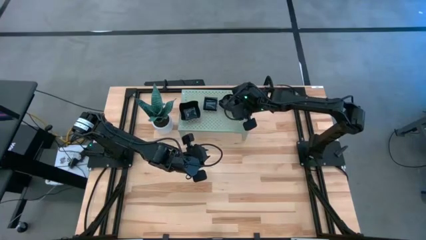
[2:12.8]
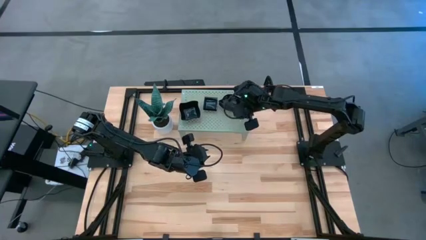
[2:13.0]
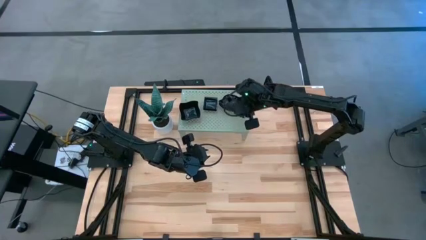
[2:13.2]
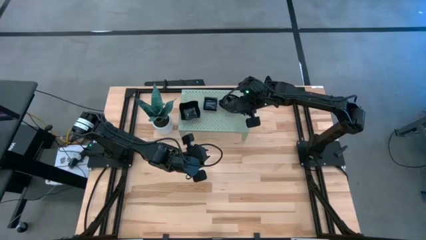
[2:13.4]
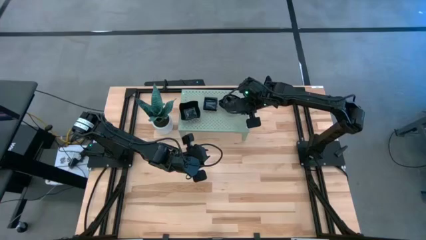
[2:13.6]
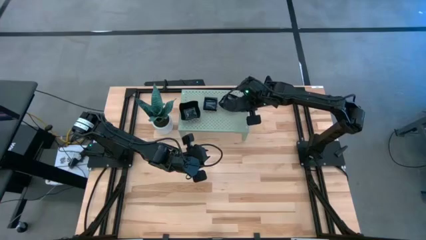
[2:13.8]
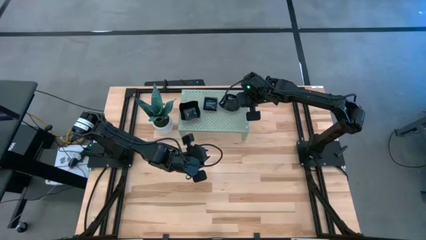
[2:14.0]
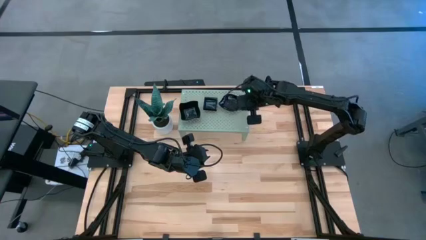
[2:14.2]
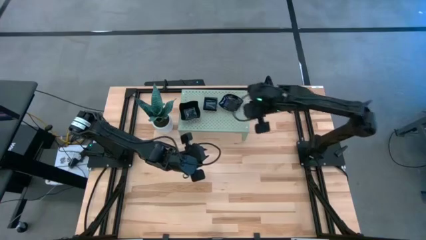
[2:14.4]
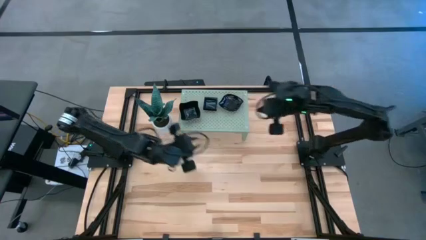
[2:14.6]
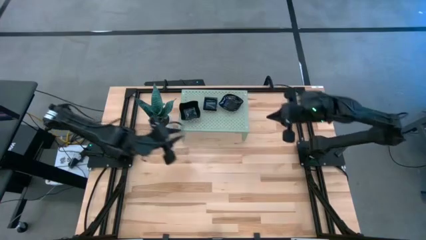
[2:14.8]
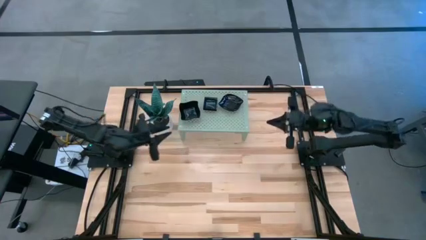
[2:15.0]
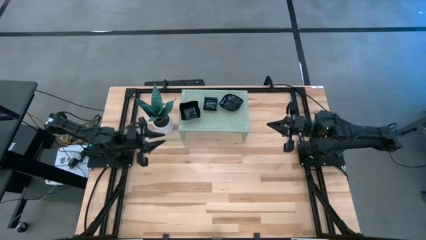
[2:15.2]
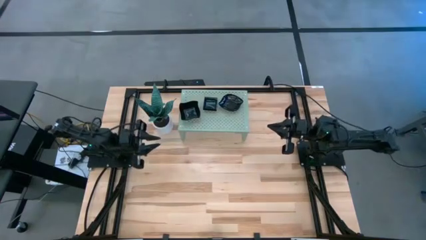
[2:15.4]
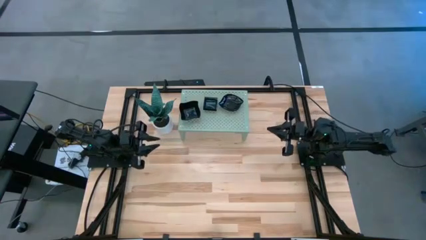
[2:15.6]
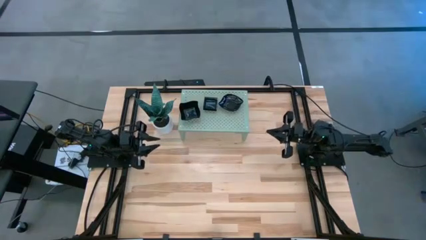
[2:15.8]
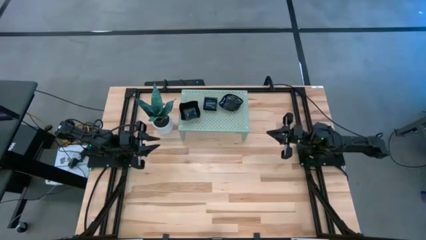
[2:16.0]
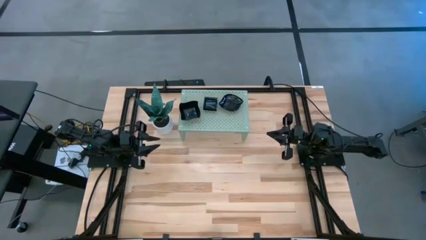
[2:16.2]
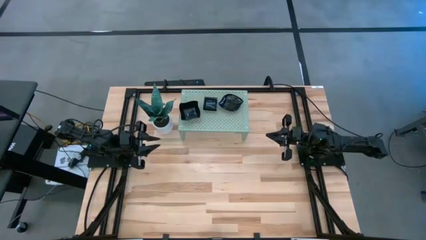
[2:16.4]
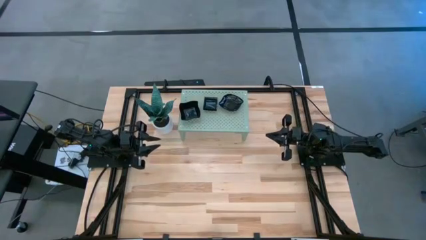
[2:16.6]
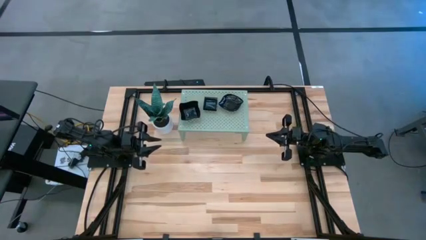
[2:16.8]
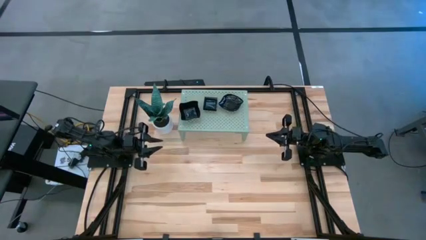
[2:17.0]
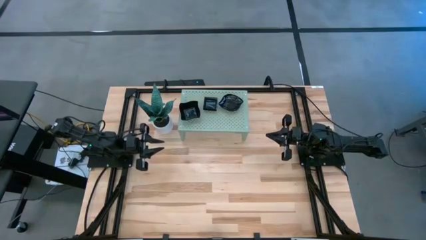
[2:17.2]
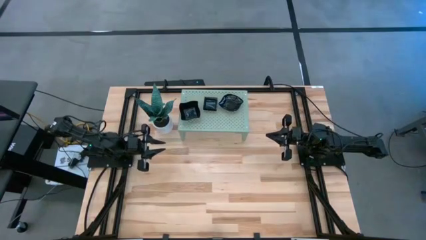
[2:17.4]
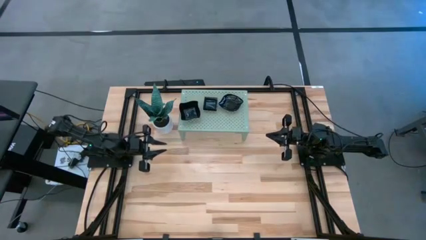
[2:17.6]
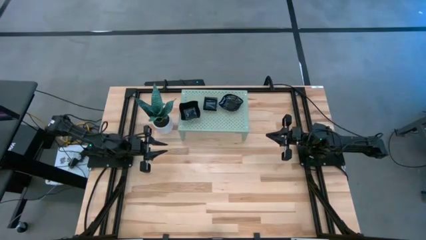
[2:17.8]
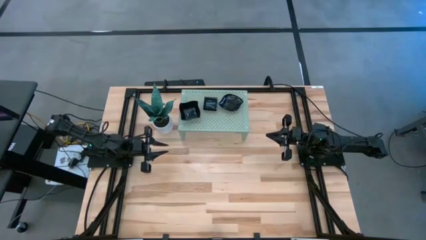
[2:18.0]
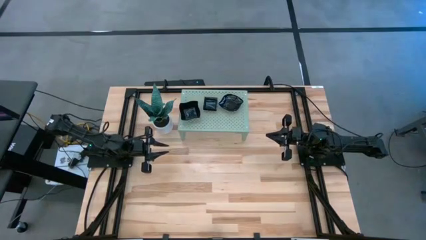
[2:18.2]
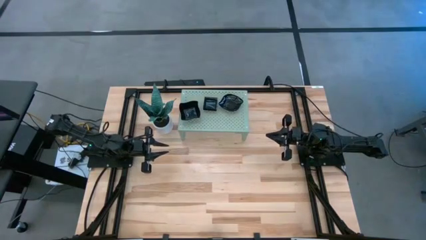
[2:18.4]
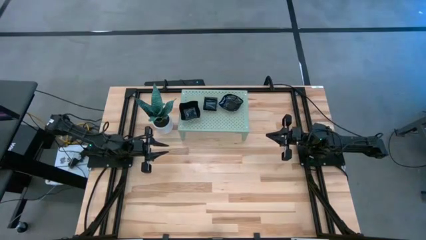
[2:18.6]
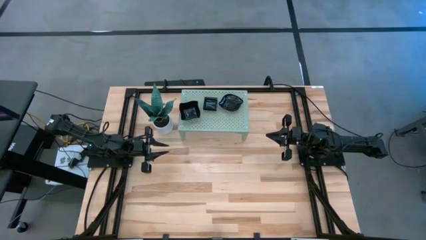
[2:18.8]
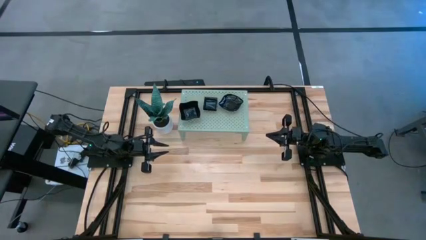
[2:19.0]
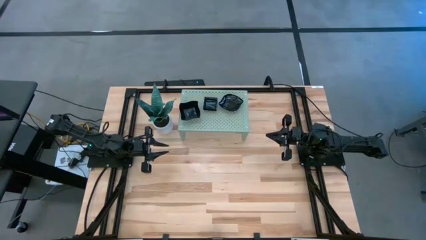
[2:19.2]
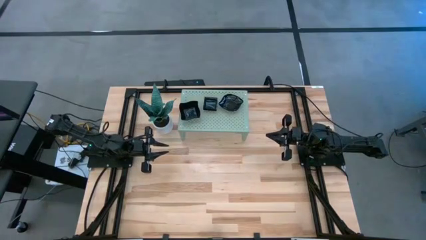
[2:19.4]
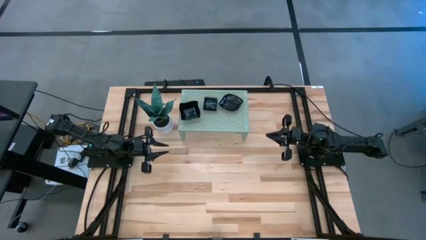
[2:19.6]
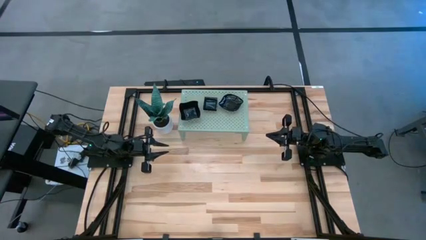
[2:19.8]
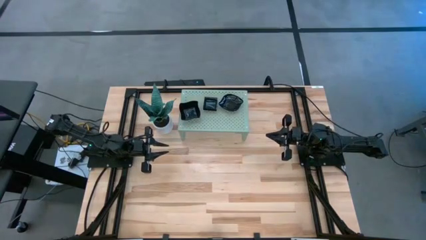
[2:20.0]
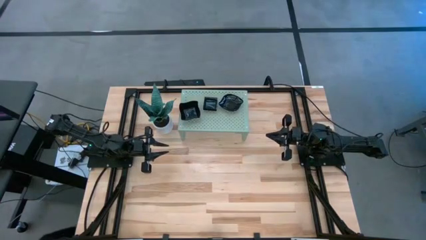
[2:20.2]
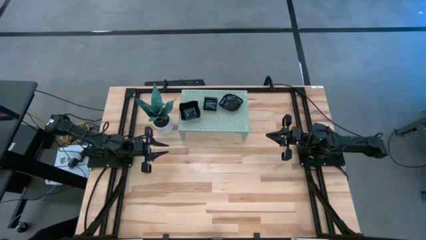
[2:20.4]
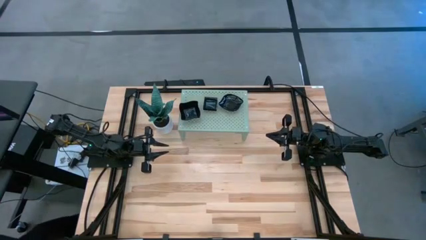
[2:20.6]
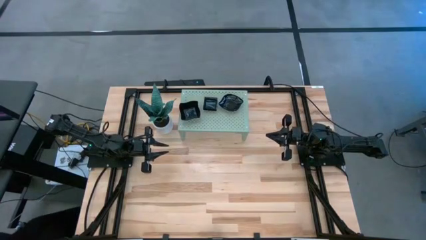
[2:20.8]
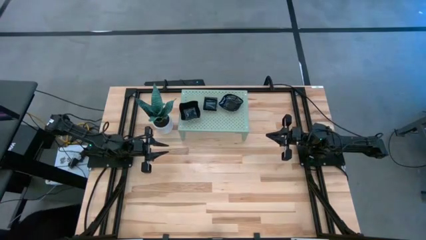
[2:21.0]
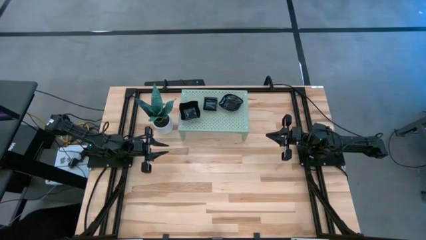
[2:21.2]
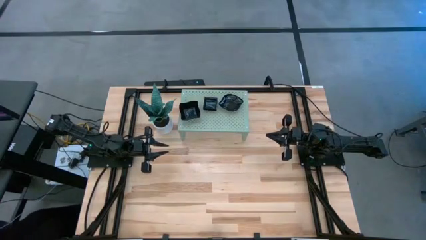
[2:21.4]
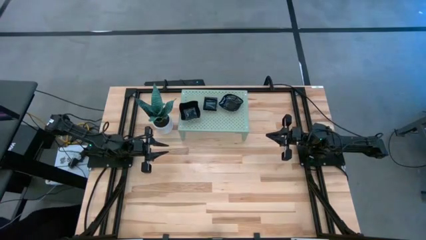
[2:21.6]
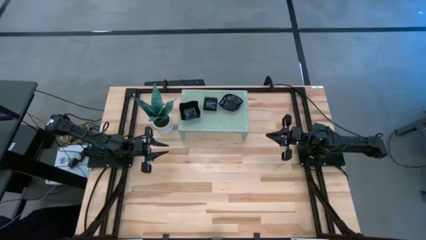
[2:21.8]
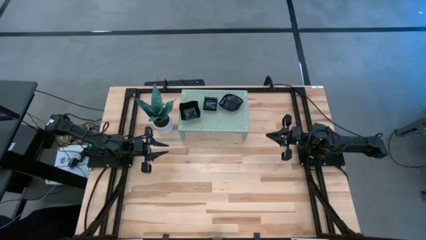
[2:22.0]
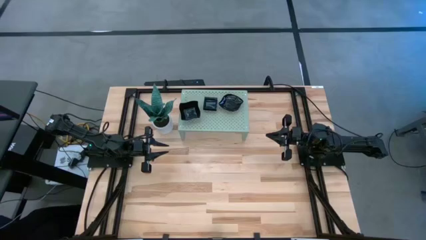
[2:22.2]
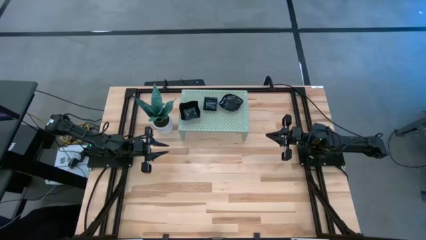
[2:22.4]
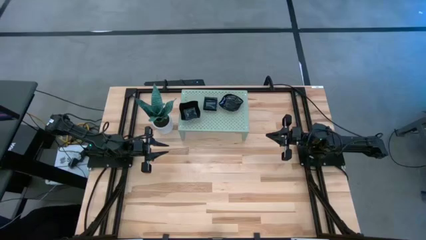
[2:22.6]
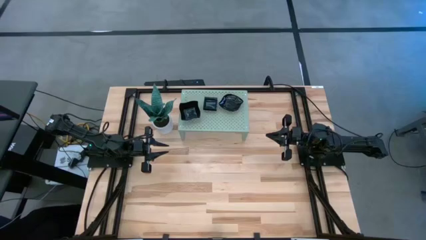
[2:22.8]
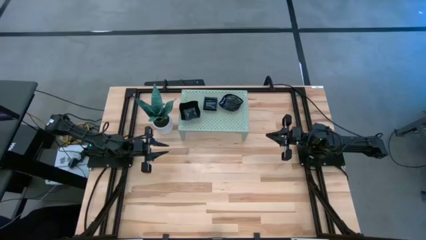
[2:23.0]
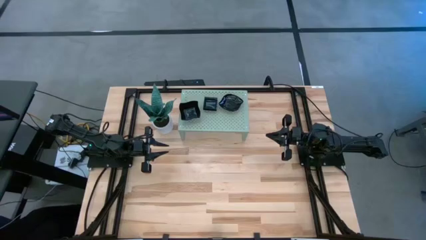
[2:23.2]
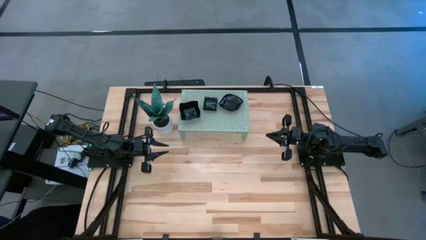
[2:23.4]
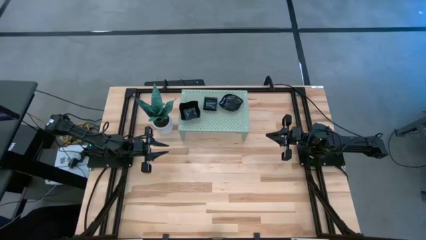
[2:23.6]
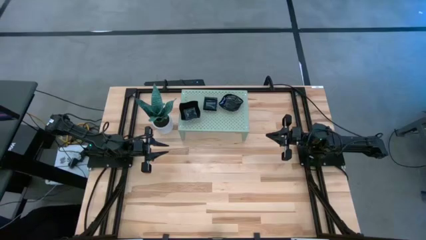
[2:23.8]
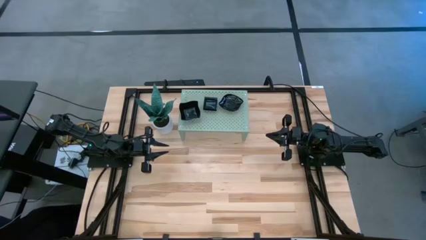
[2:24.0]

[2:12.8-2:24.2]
Task: Pick & Place Mini shaped plates
Return to Home Position

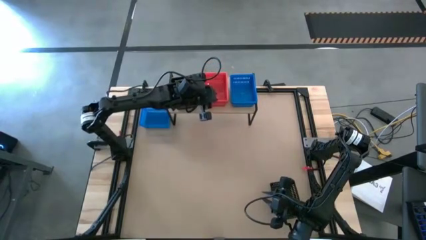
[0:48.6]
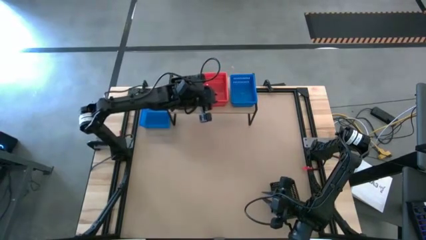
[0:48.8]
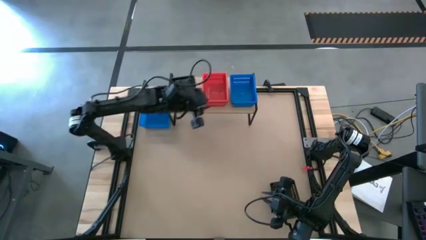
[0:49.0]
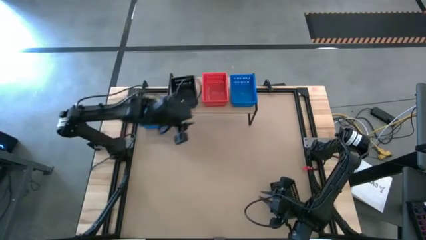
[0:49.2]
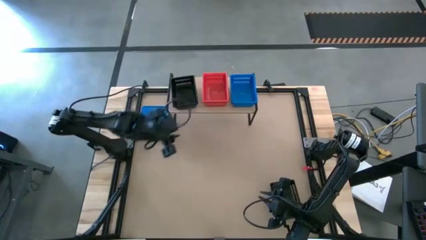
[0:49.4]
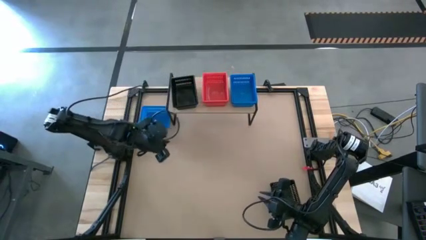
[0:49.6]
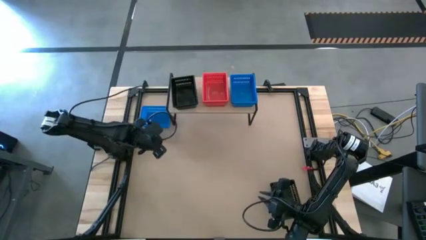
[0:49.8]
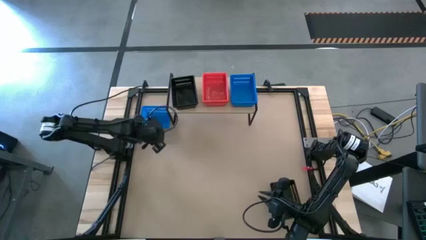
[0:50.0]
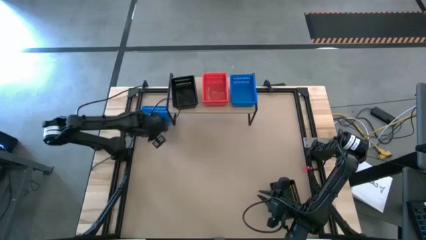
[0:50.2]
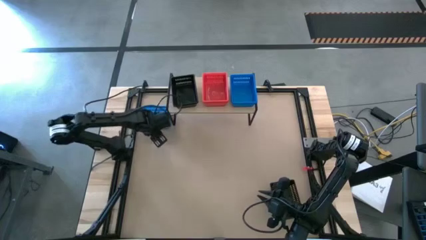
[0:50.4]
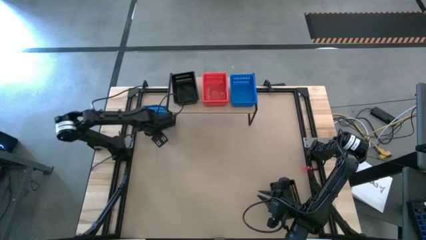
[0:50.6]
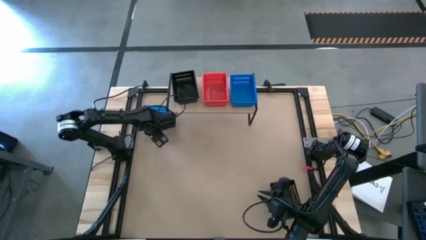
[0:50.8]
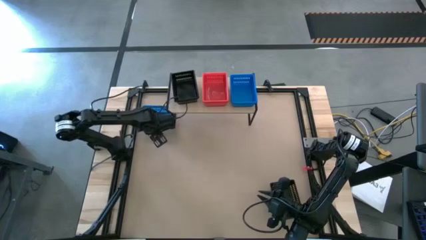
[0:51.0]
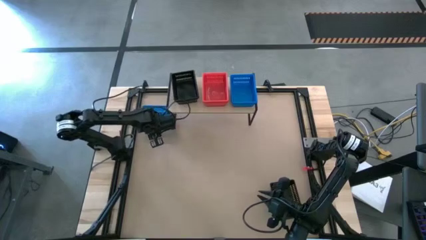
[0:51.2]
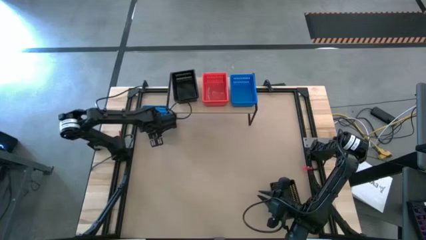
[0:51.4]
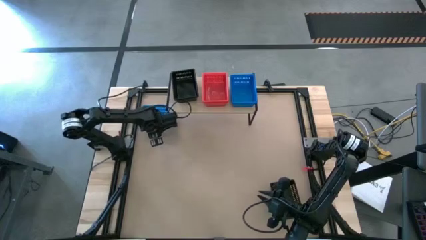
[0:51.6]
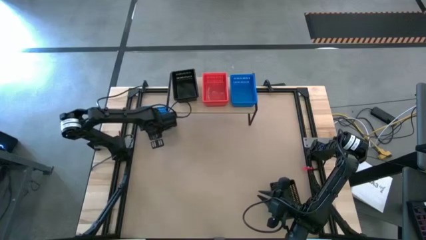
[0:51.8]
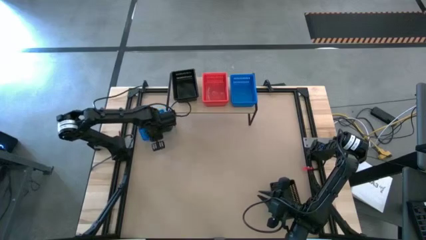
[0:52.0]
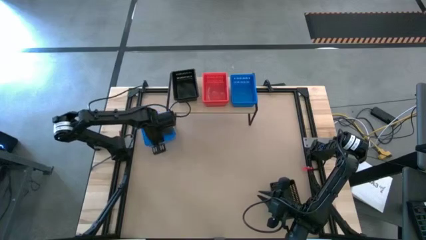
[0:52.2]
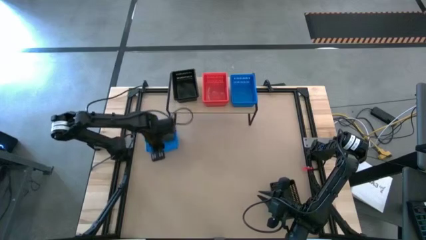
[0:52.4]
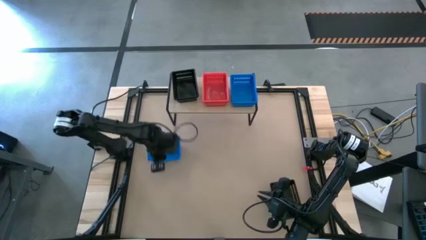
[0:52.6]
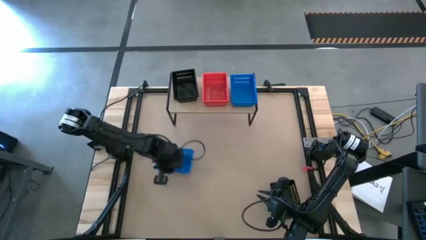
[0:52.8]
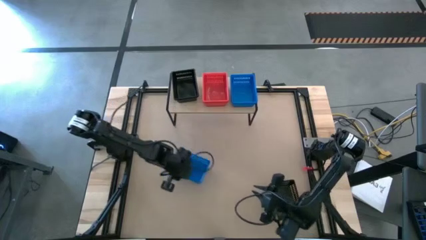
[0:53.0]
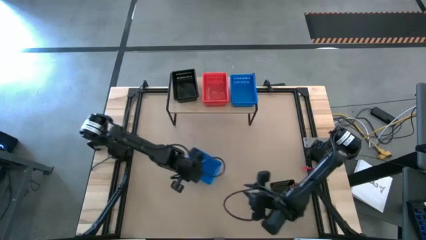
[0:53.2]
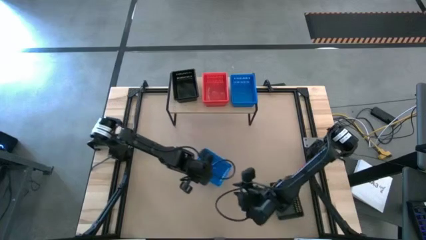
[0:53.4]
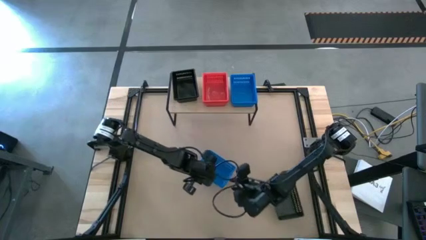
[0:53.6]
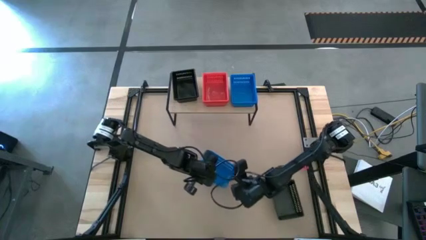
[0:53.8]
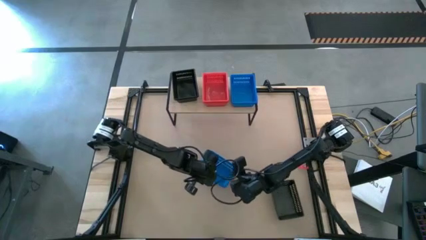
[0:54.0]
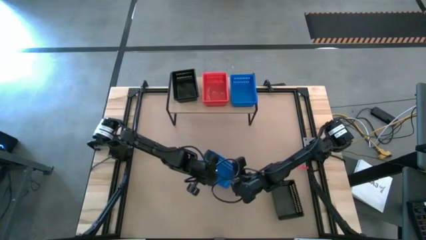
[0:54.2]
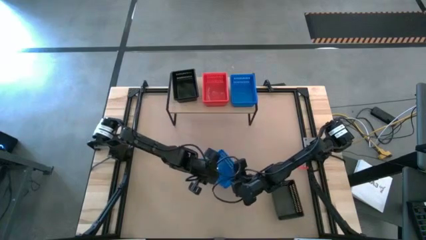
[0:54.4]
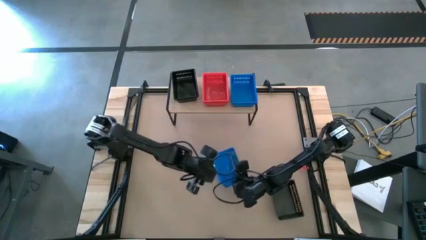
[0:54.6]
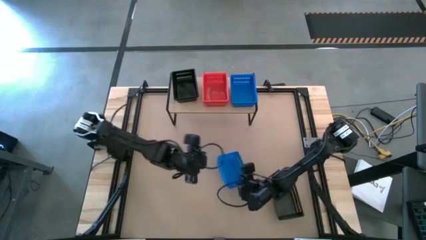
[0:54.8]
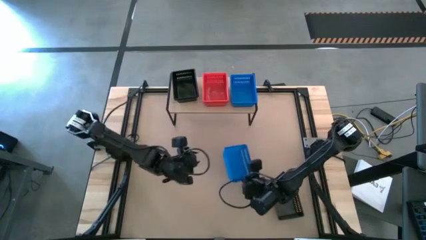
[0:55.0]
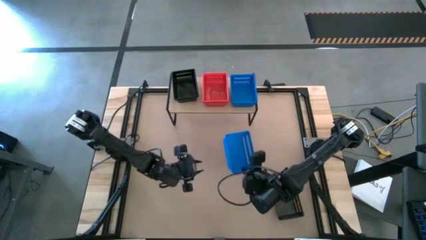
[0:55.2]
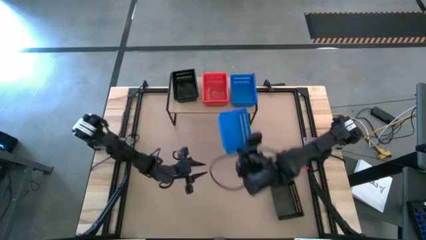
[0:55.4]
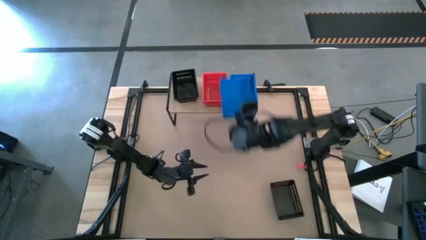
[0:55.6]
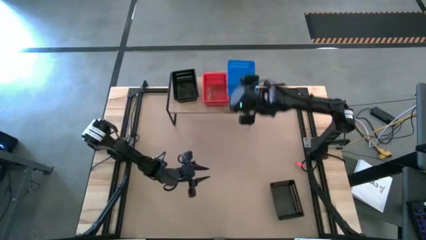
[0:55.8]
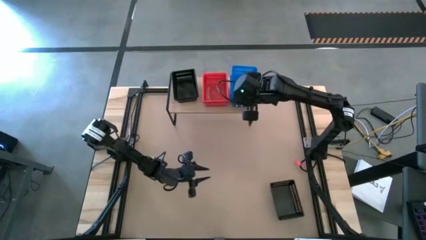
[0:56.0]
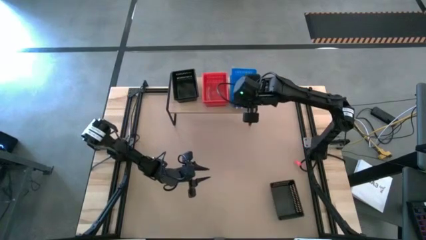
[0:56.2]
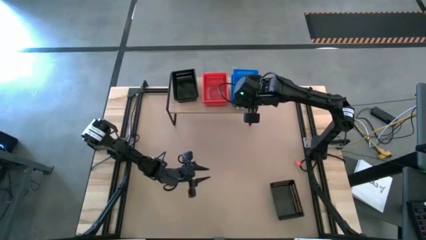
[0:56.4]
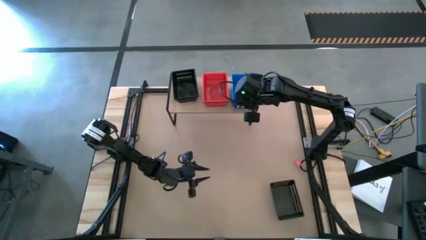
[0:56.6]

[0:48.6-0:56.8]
Task: Stack baskets on shelf by color
Stack the blue bin on the blue bins on the shelf
